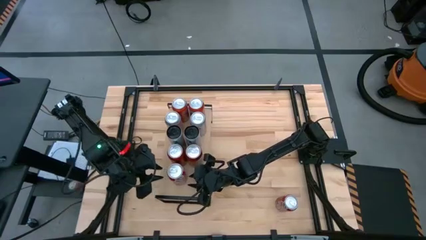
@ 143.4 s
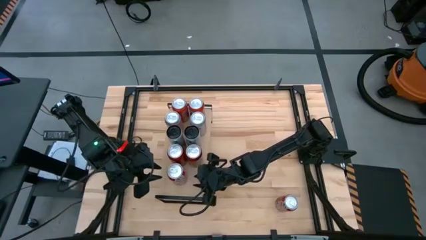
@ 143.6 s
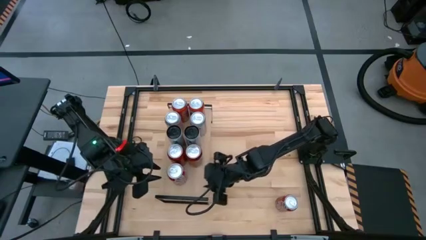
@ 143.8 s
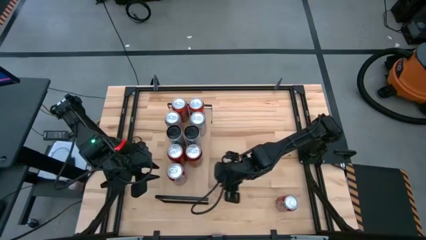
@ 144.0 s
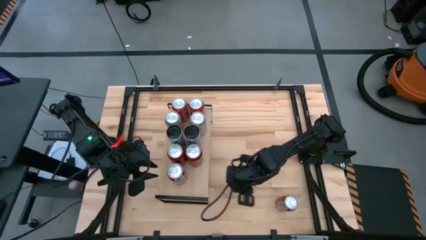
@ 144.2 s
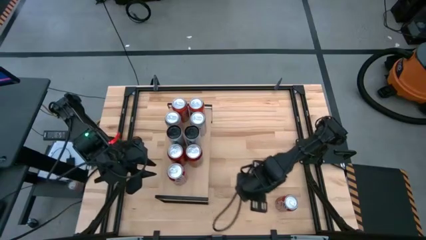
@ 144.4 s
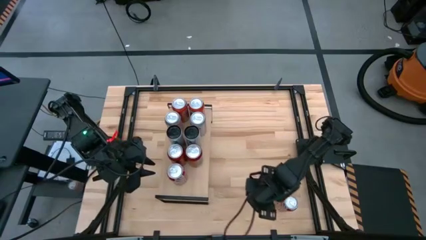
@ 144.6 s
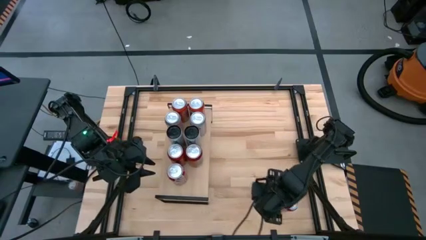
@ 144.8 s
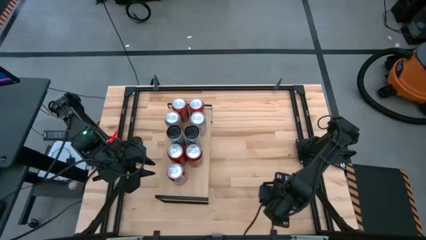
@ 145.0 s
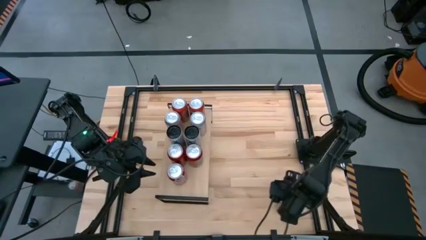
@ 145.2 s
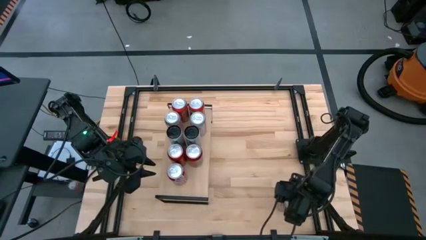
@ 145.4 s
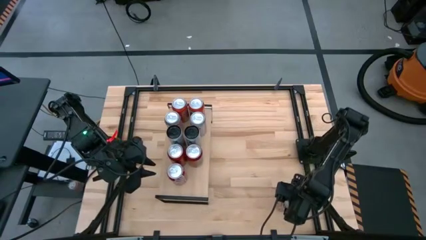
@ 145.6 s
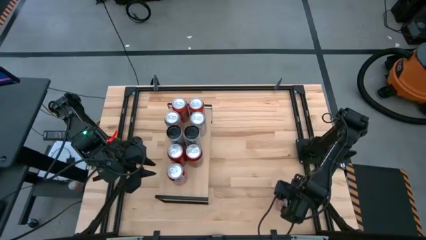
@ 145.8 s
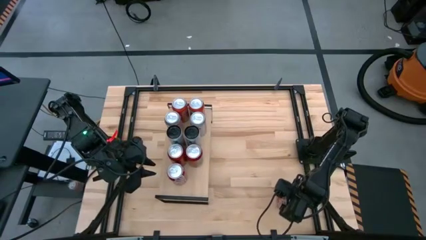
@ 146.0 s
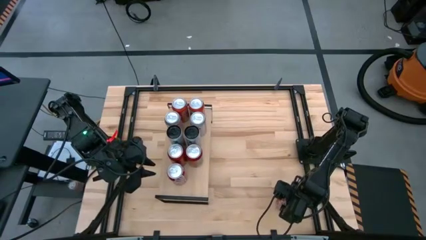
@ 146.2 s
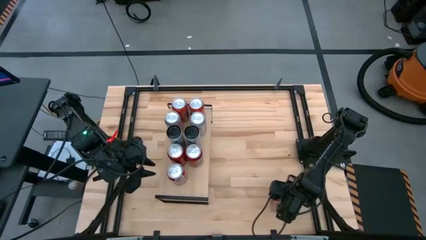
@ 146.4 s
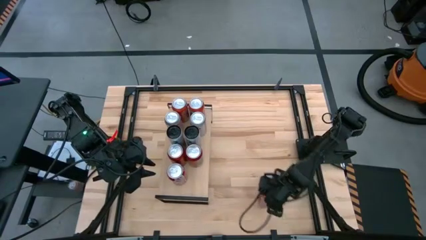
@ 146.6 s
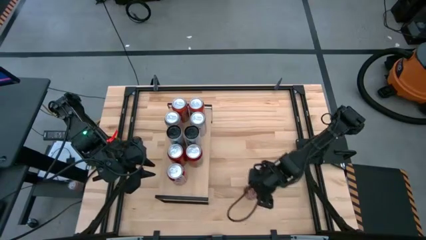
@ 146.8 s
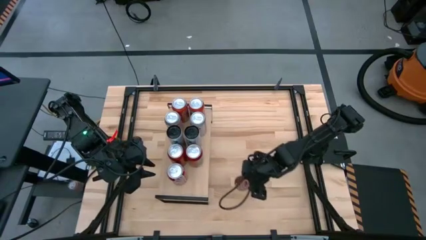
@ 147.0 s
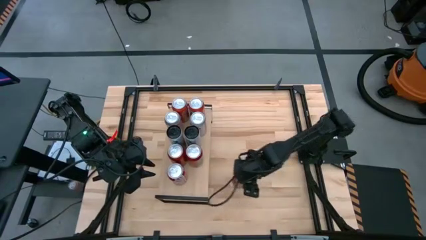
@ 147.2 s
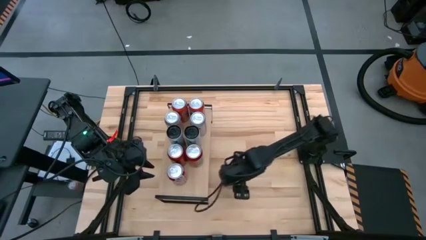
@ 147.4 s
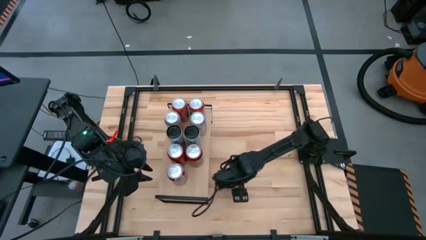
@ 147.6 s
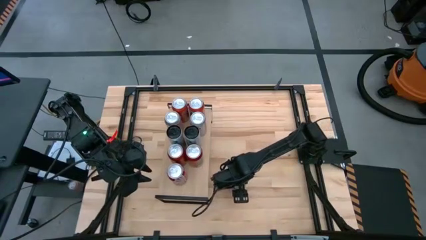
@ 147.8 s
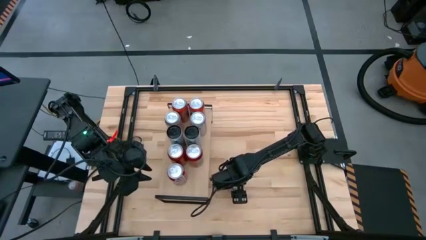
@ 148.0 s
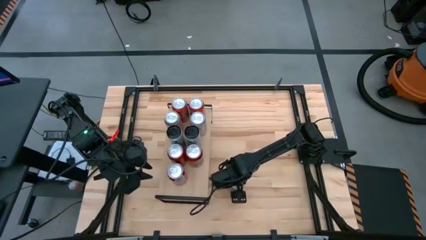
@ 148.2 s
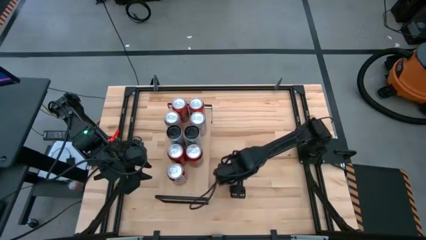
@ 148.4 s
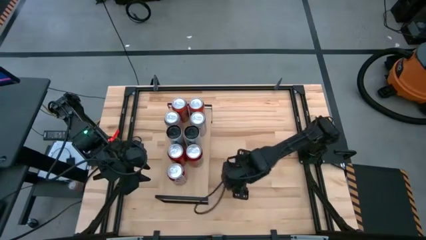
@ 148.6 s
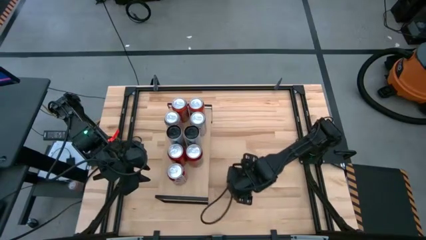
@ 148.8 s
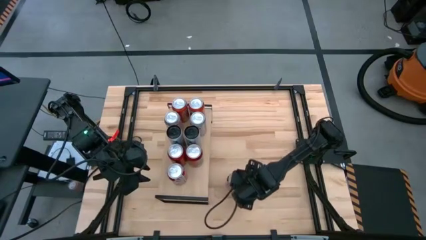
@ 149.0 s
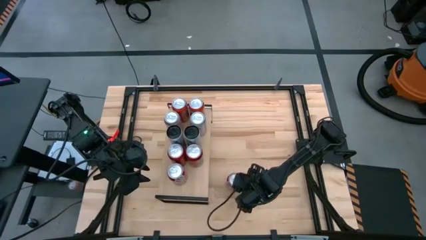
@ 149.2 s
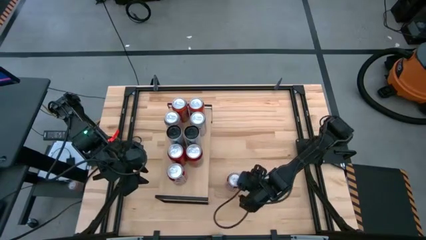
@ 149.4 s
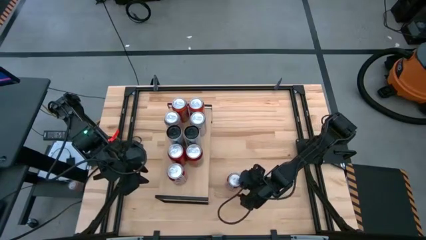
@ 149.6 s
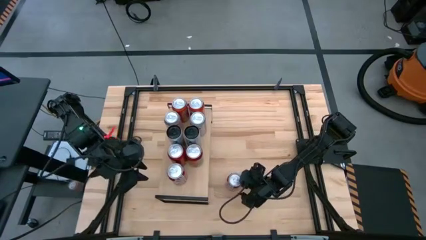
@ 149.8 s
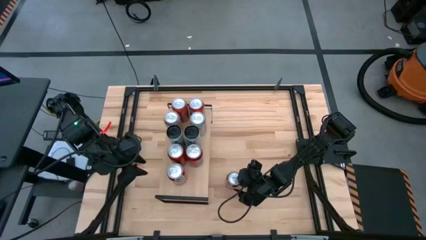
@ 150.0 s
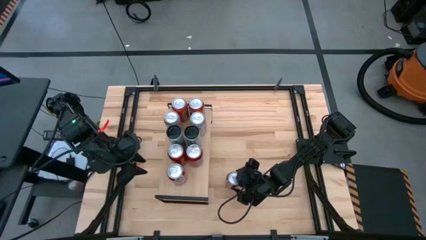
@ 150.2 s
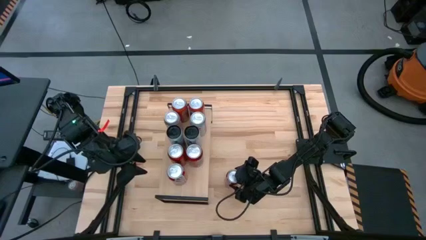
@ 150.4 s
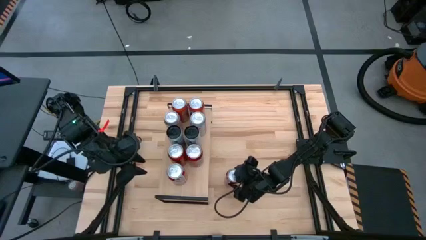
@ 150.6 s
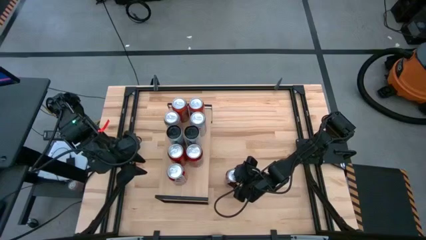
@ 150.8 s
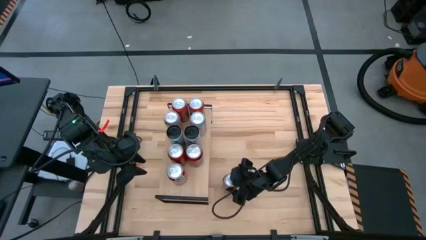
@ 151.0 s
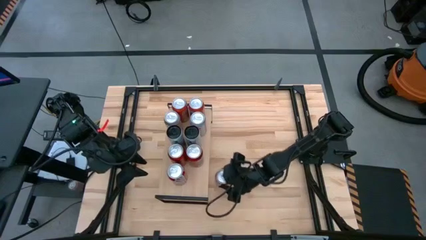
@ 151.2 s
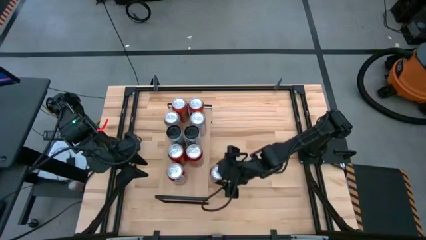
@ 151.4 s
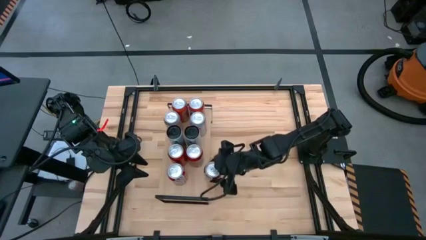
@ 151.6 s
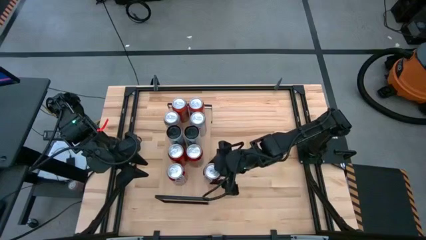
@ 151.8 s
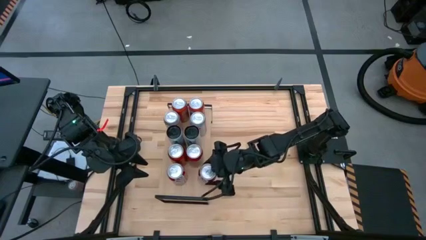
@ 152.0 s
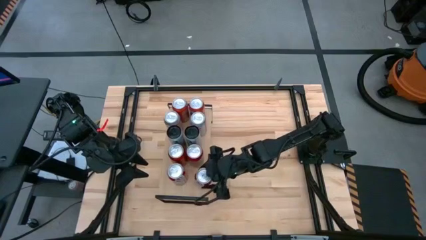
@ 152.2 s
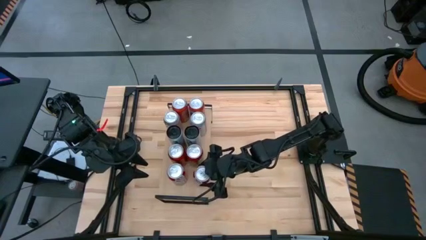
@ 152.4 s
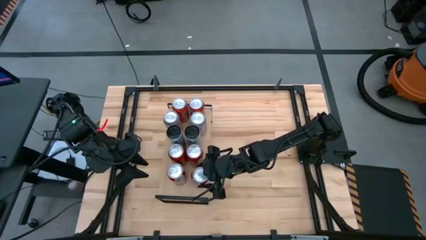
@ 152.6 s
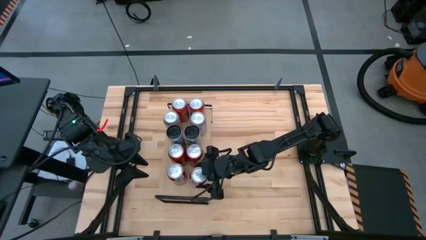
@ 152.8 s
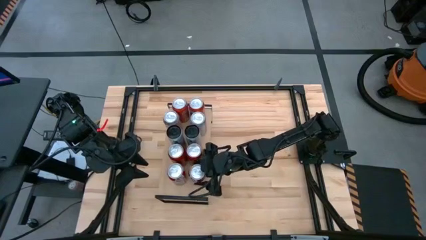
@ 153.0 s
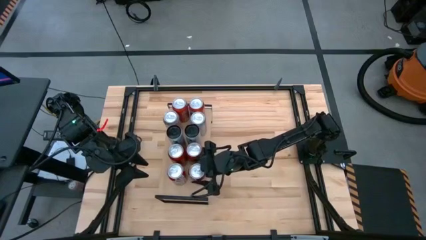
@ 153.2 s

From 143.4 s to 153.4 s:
Task: Pick and place cans onto a shelf
Put the red and white soda can on the shelf aligned with the other red and white pattern soda can

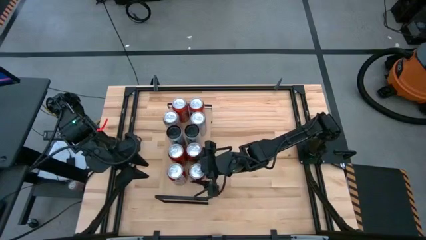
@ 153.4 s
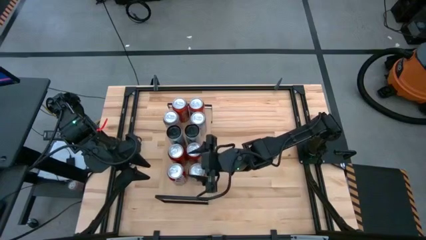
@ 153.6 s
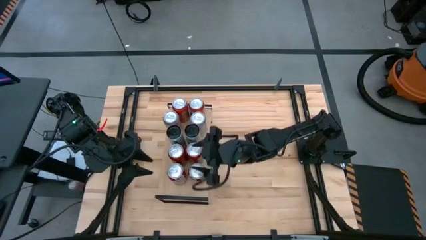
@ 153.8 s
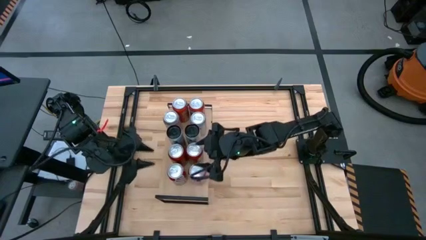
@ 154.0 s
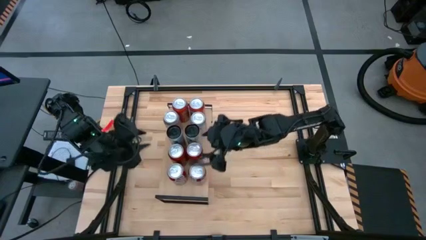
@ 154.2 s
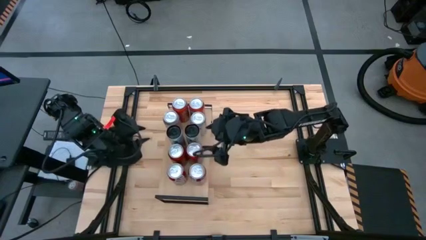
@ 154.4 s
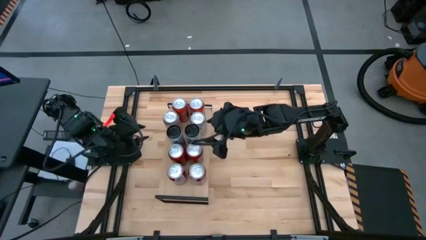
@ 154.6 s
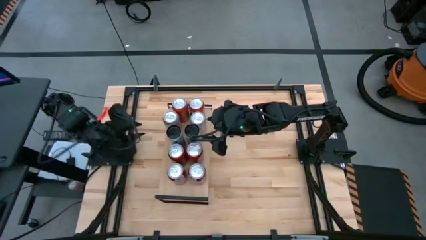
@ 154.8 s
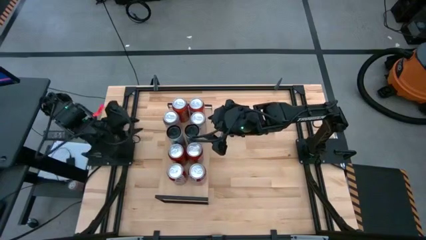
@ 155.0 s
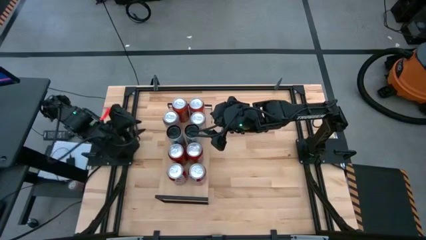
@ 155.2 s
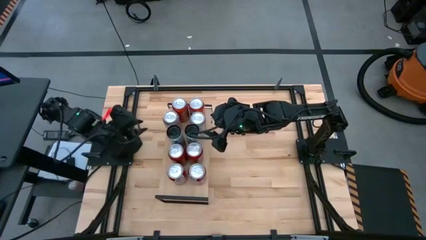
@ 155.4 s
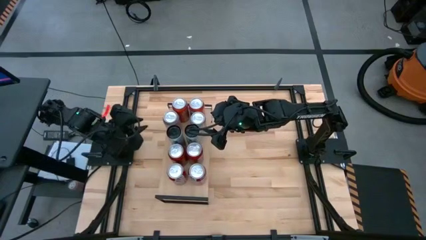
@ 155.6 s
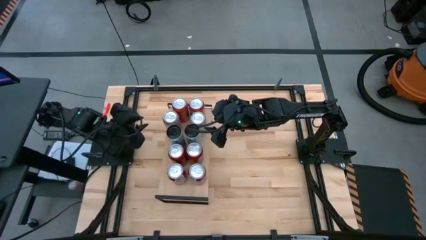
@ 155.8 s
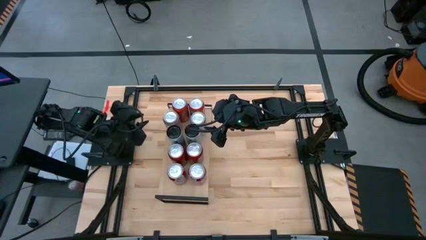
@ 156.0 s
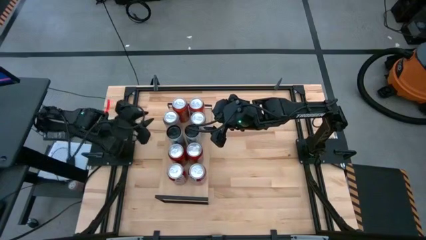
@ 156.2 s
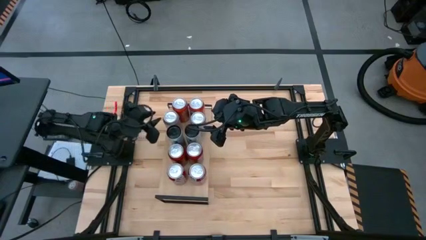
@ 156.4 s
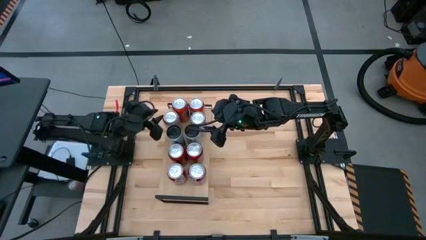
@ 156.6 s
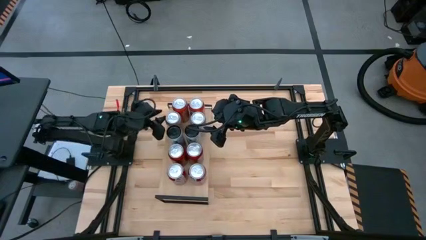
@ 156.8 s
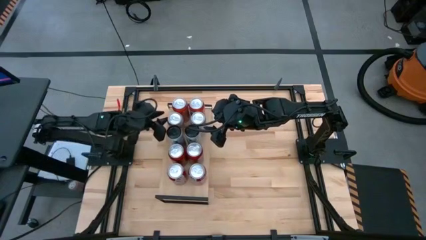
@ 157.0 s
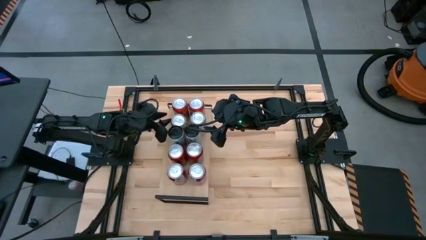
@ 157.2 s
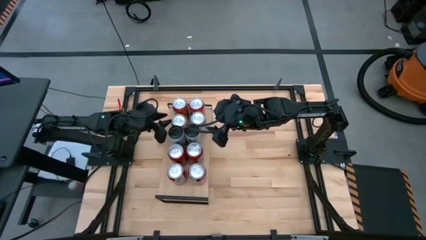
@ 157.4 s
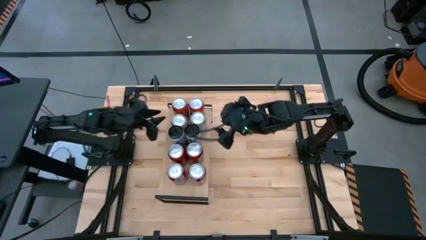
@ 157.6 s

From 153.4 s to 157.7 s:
Adjust the red-silver soda can on the shelf
